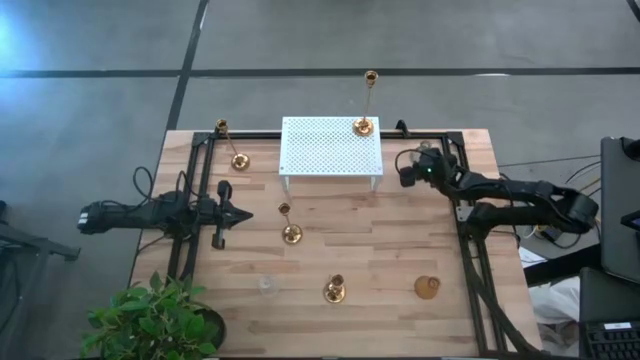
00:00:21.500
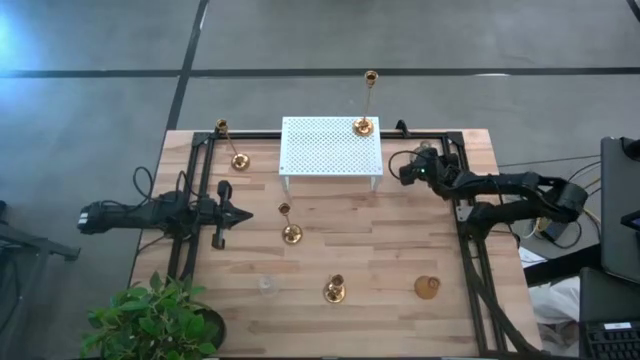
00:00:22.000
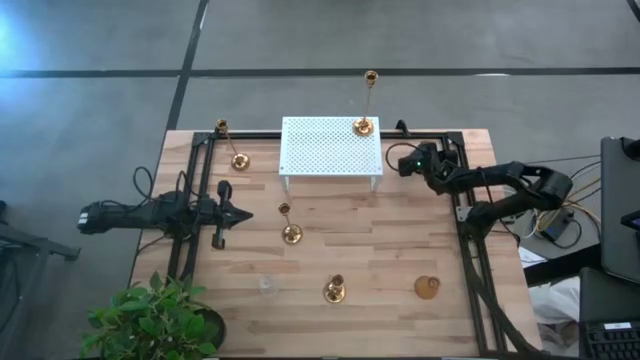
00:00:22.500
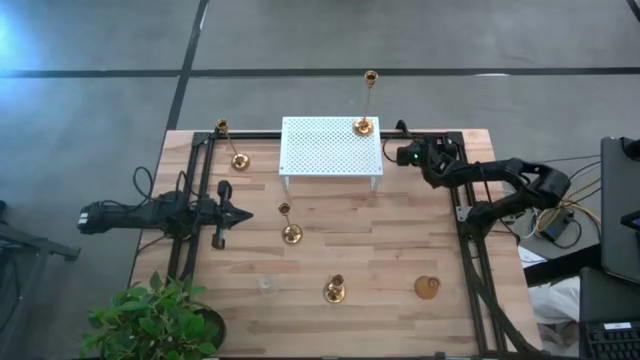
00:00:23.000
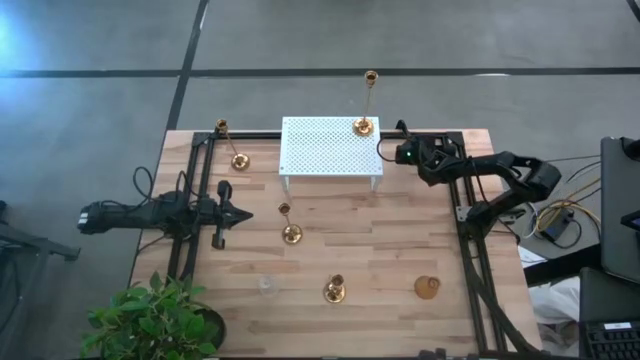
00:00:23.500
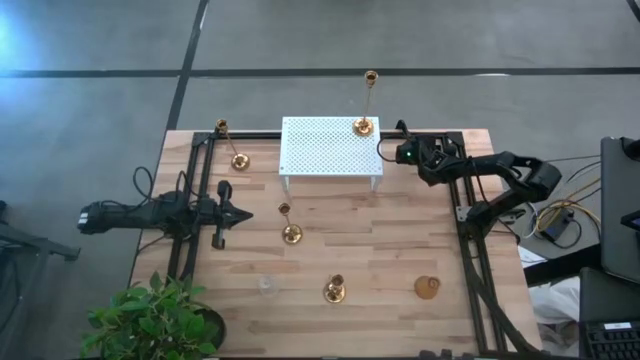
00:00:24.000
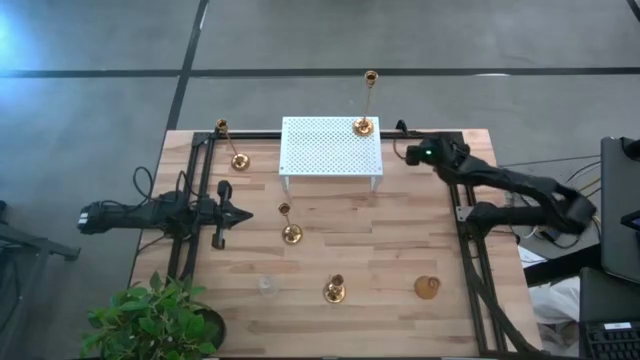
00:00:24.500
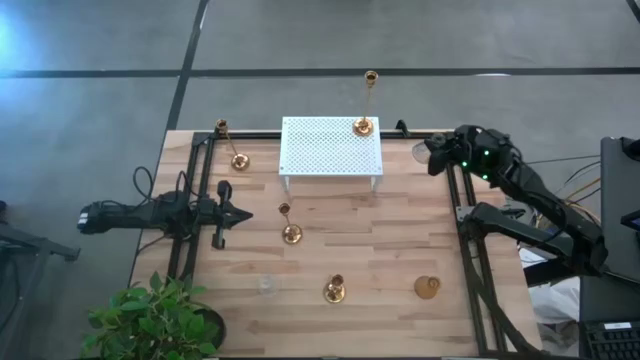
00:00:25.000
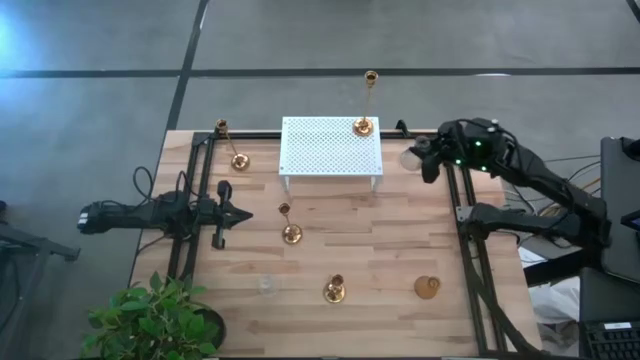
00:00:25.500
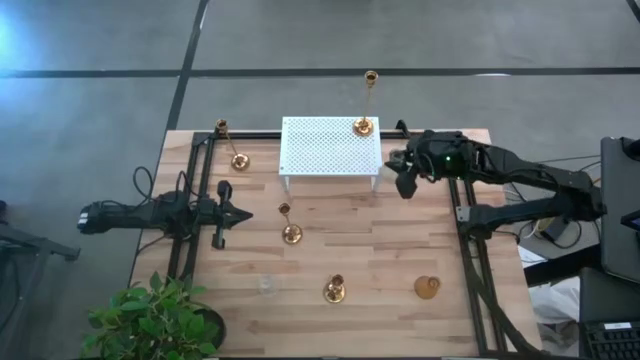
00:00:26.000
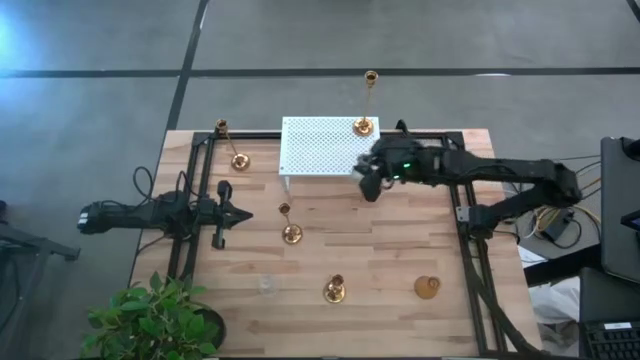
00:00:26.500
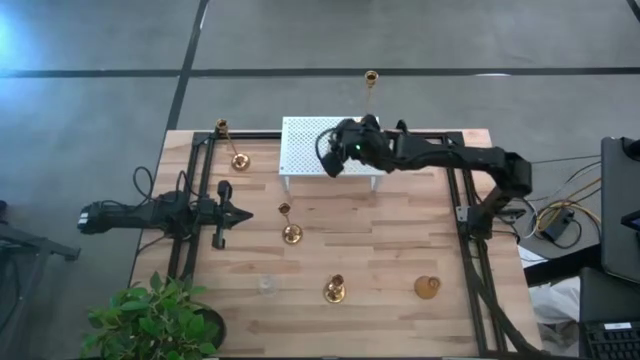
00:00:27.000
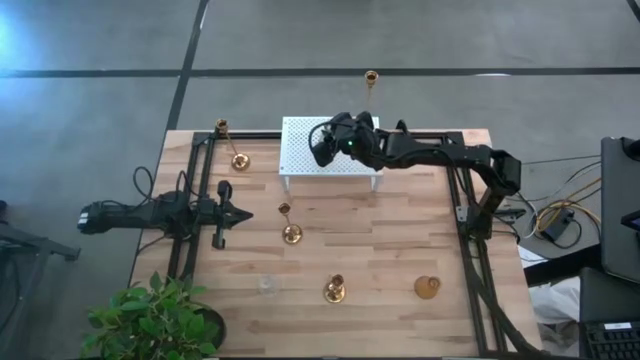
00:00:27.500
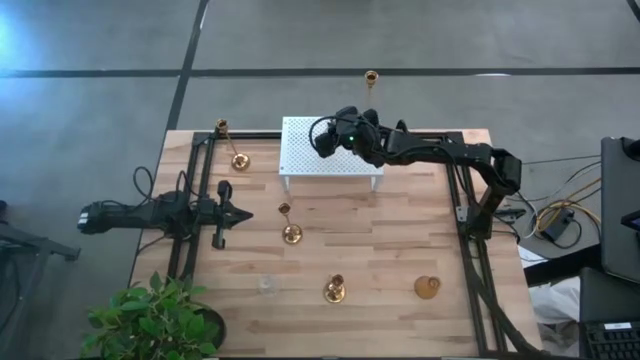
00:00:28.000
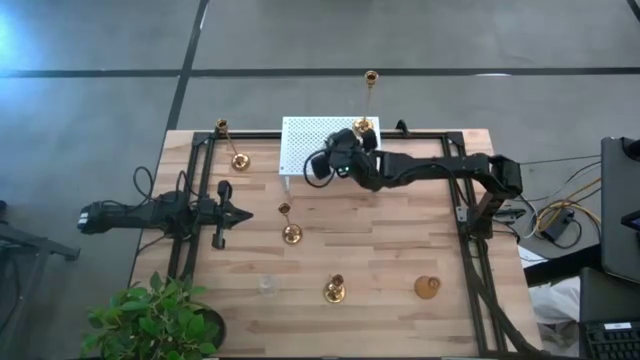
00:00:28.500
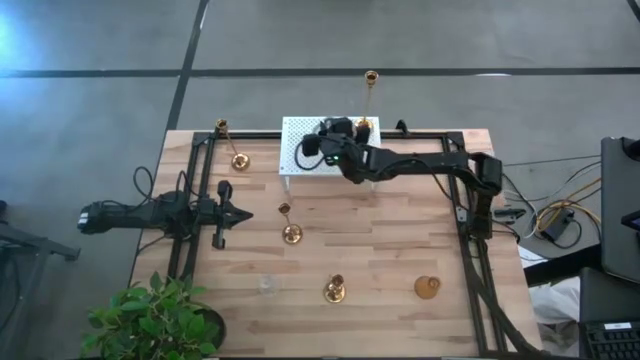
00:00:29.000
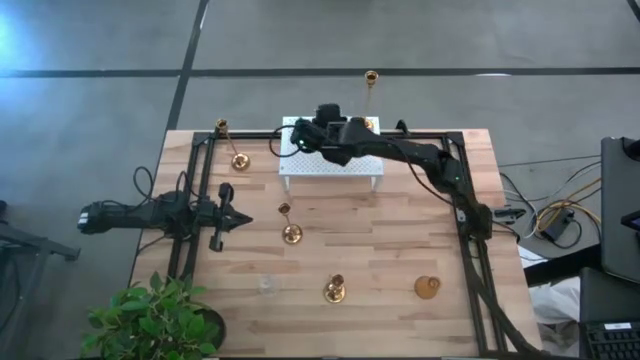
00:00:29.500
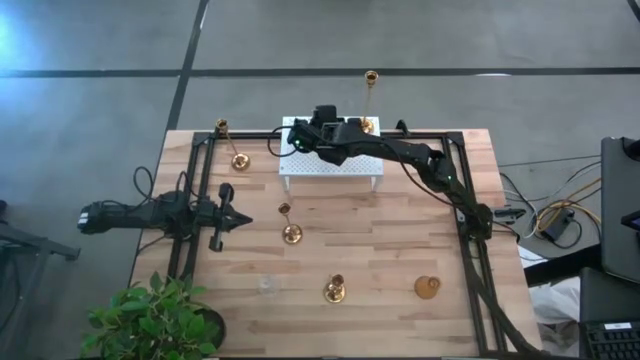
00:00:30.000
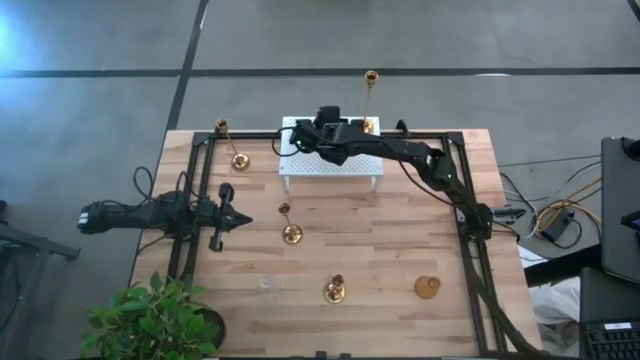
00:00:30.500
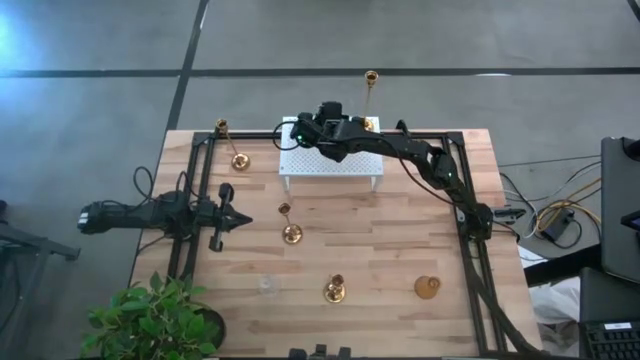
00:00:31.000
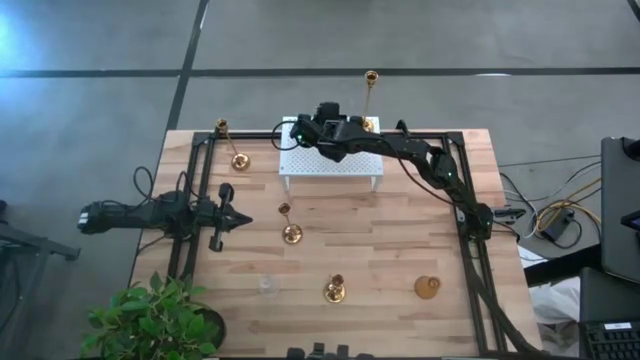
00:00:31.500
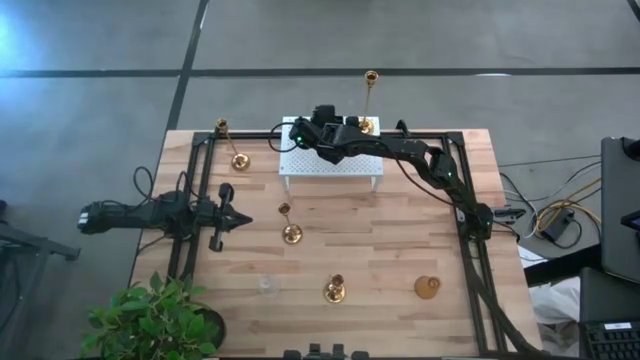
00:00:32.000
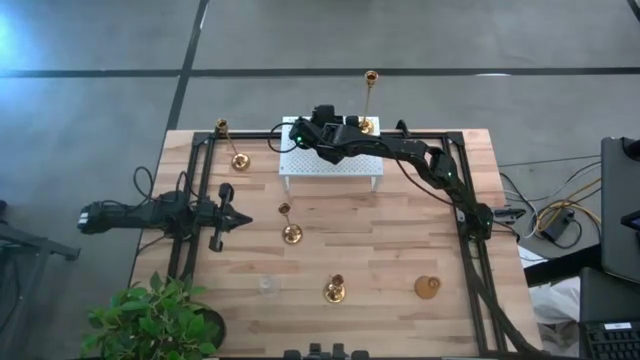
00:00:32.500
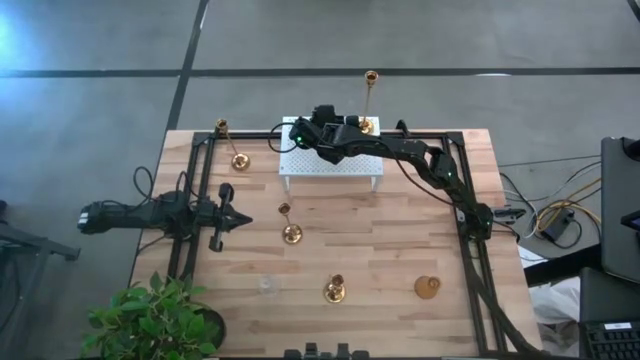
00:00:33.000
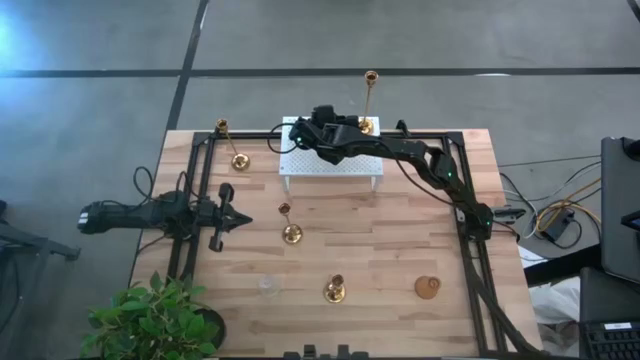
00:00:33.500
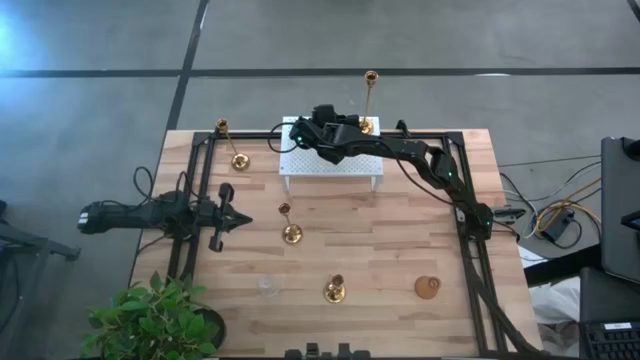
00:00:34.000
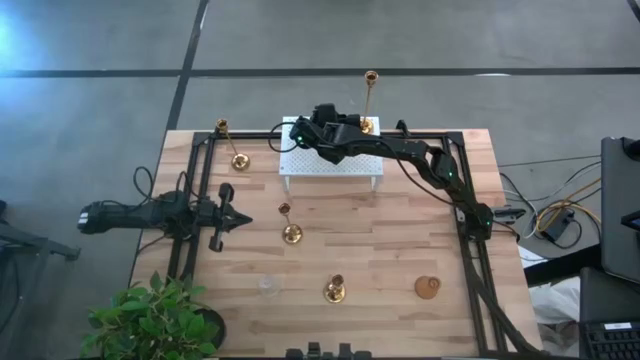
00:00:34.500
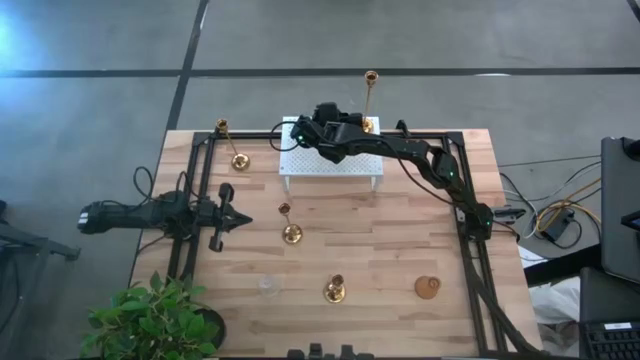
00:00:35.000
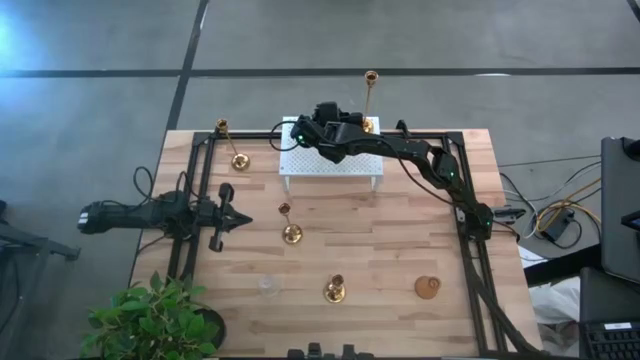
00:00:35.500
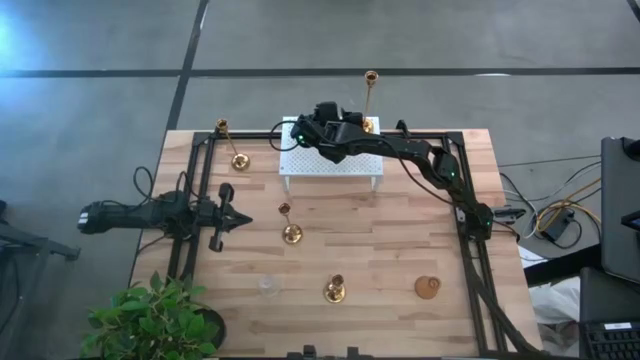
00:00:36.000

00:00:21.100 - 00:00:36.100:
Task: Pick & Place candle stick holders
Put the blue glass candle holder on the shelf

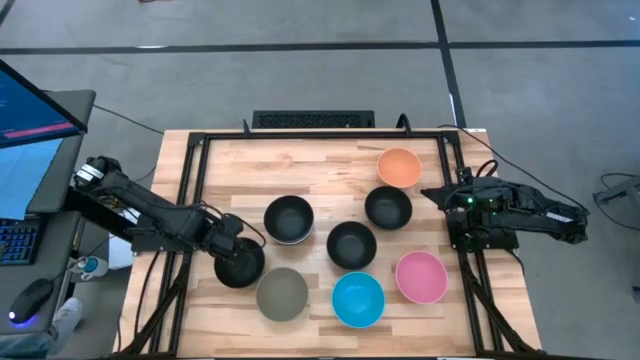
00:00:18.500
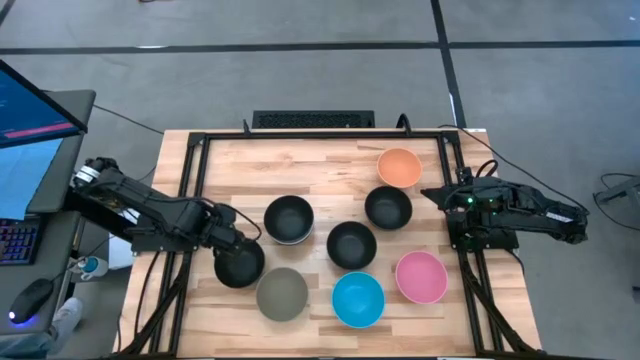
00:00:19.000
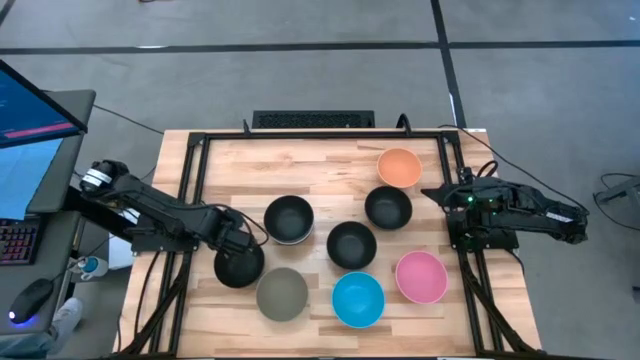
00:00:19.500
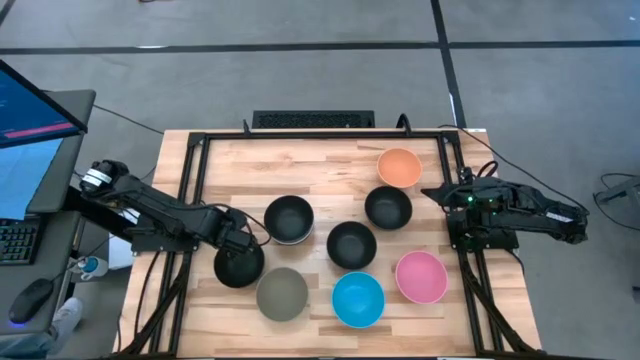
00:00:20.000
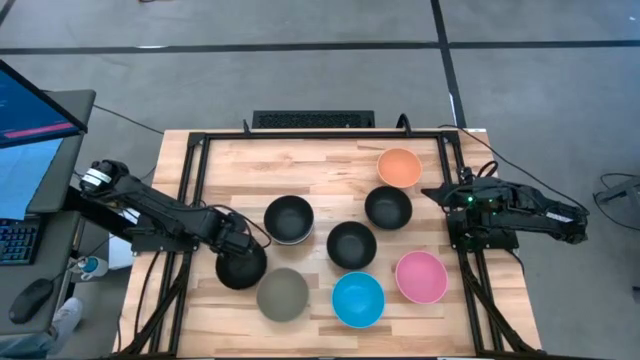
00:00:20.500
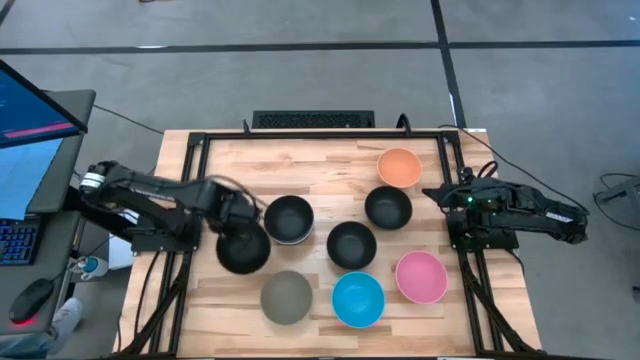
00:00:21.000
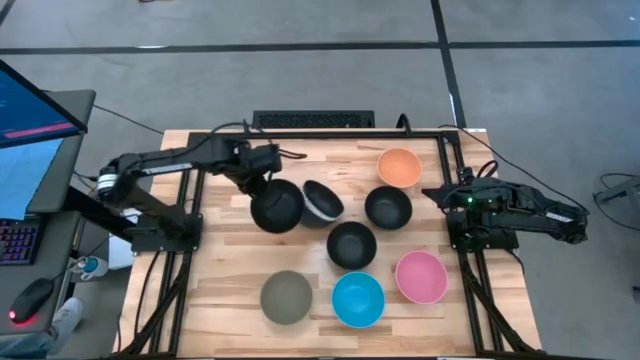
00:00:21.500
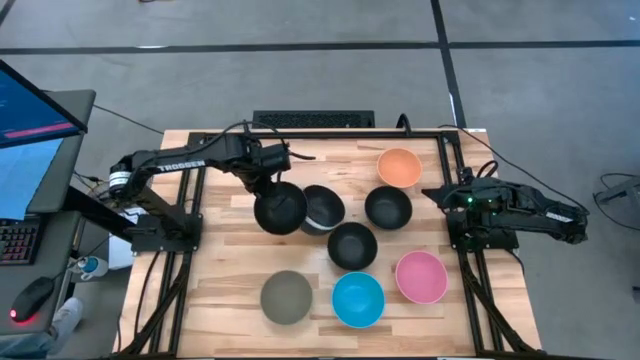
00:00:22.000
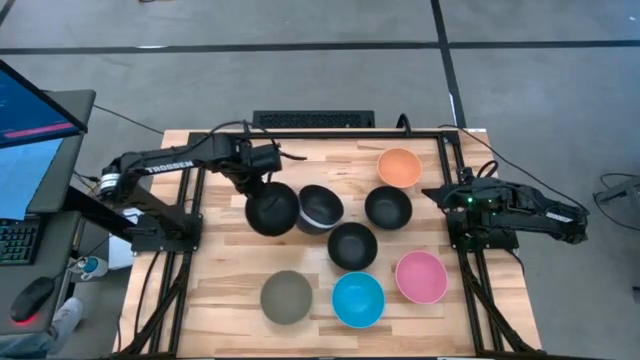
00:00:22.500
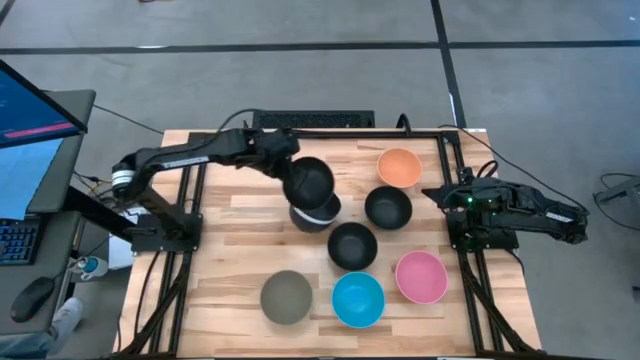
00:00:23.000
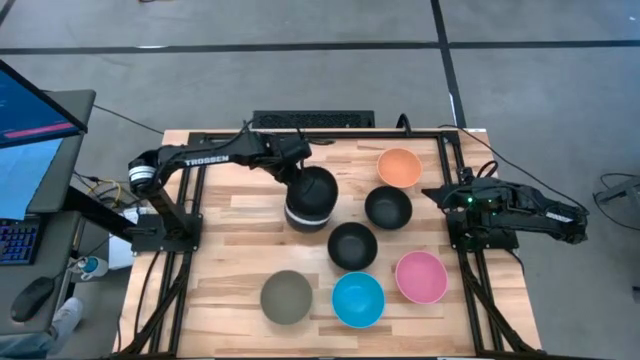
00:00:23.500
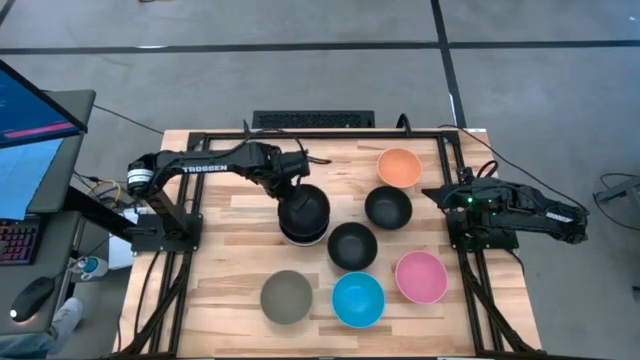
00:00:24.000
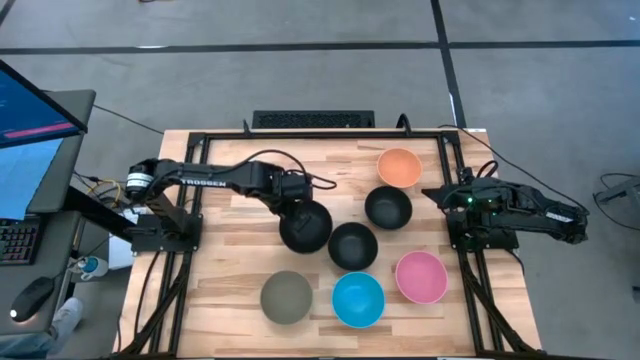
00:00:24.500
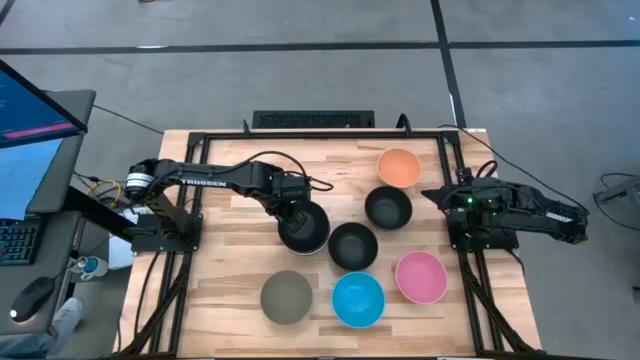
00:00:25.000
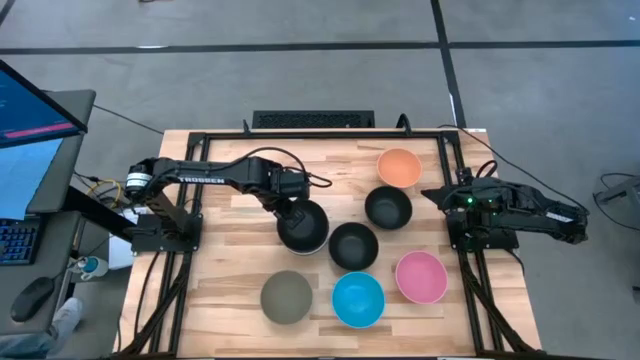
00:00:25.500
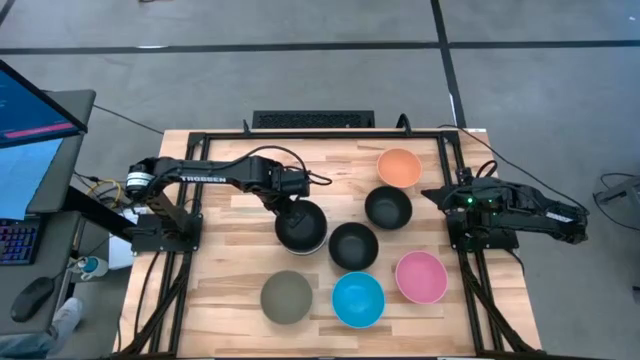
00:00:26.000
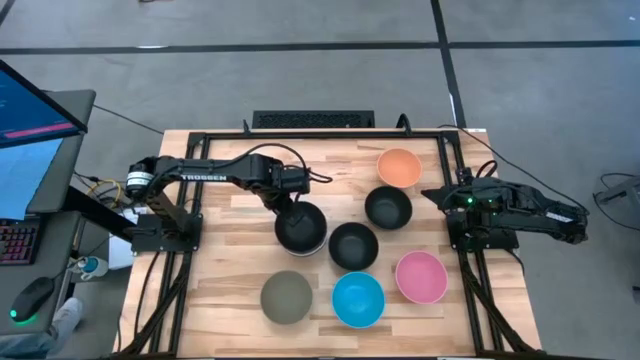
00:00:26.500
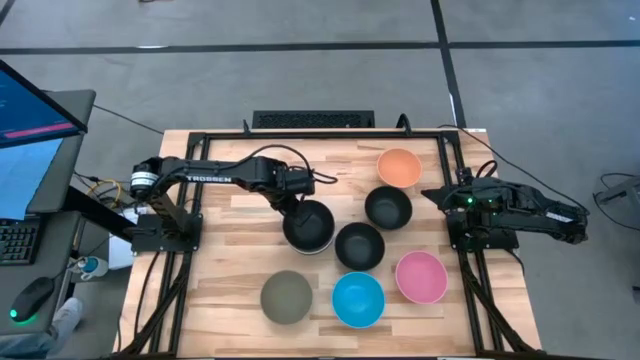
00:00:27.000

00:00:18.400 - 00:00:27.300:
Task: Nest bowls inside each other
Stack the black bowl on top of the other black bowl
